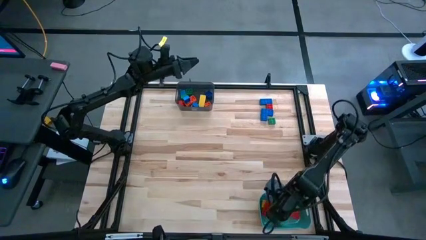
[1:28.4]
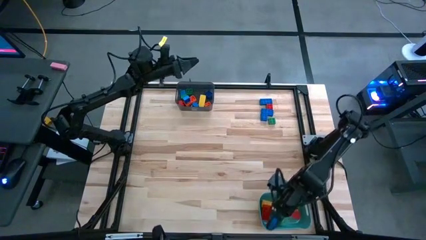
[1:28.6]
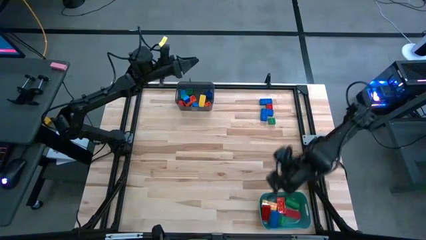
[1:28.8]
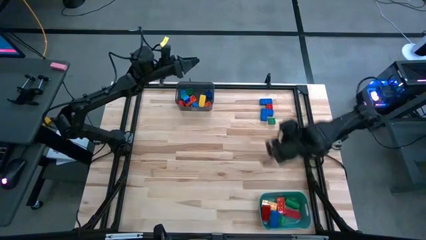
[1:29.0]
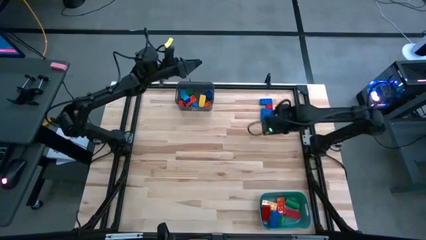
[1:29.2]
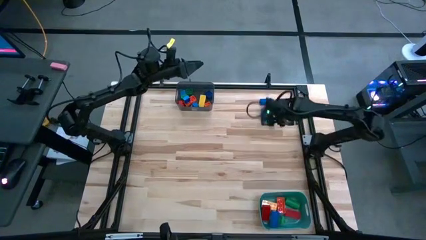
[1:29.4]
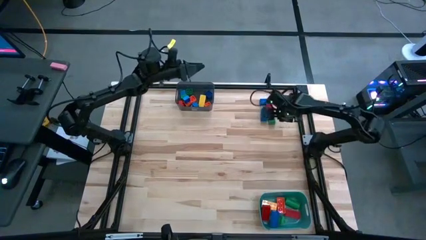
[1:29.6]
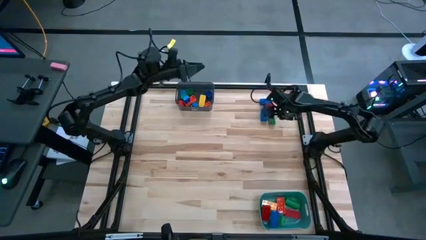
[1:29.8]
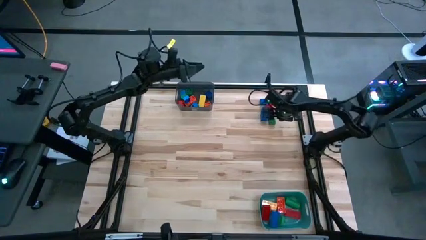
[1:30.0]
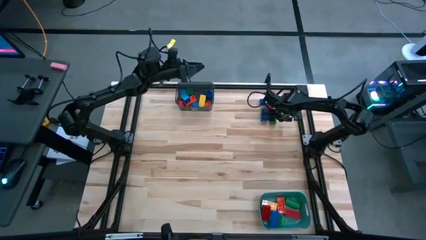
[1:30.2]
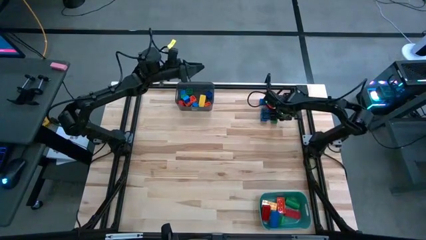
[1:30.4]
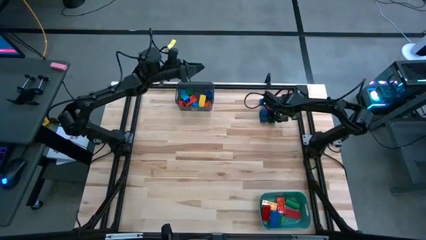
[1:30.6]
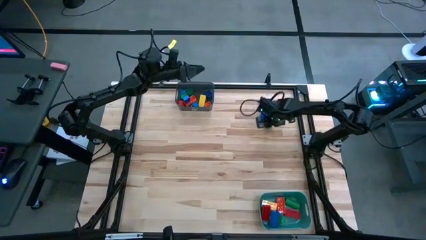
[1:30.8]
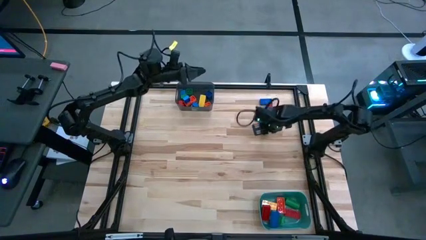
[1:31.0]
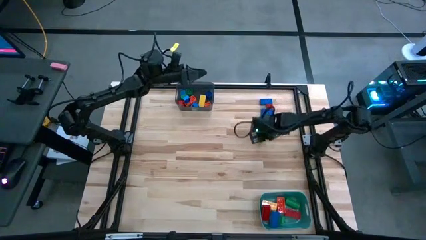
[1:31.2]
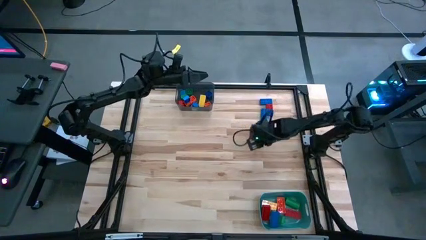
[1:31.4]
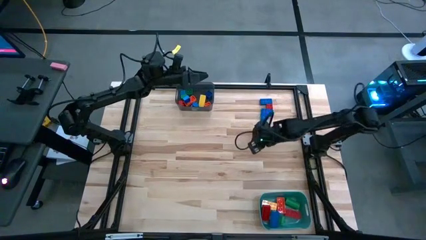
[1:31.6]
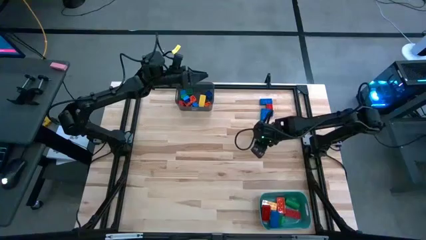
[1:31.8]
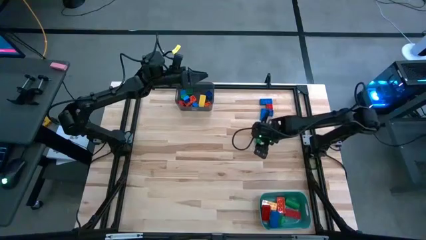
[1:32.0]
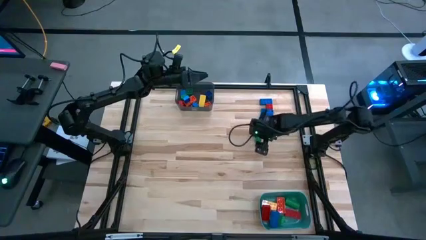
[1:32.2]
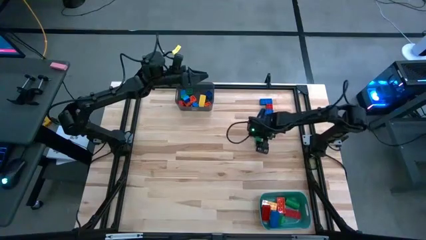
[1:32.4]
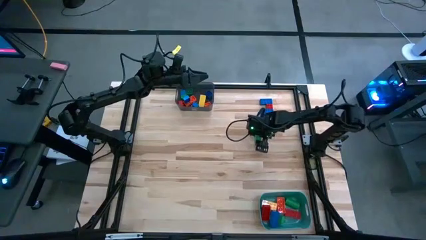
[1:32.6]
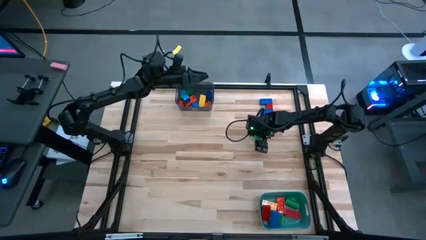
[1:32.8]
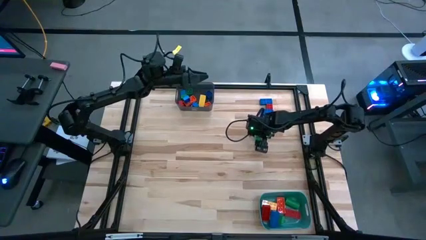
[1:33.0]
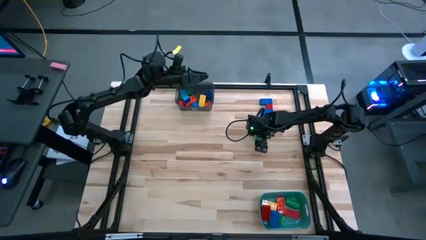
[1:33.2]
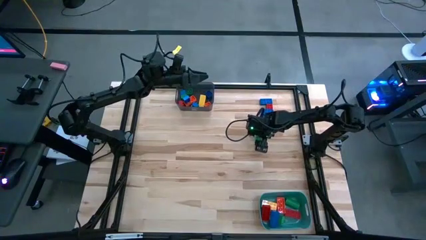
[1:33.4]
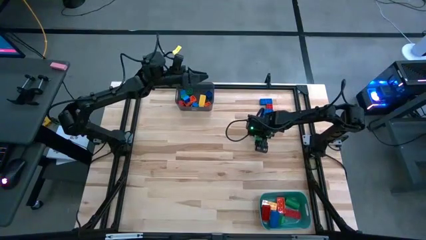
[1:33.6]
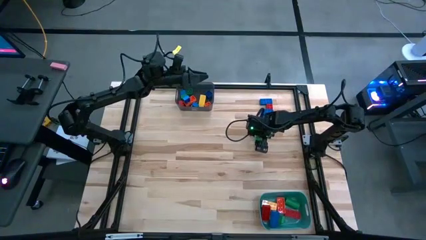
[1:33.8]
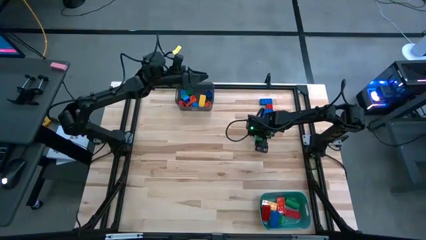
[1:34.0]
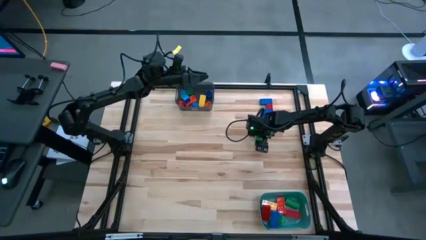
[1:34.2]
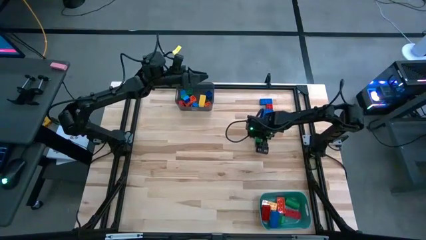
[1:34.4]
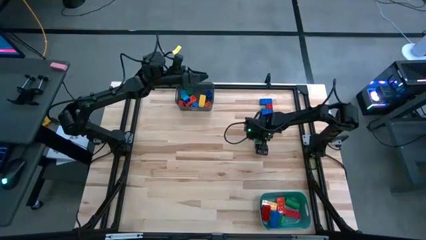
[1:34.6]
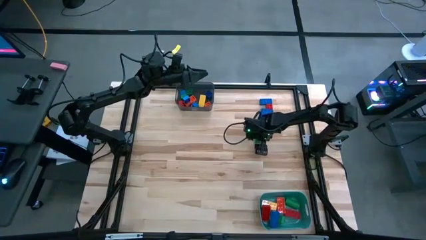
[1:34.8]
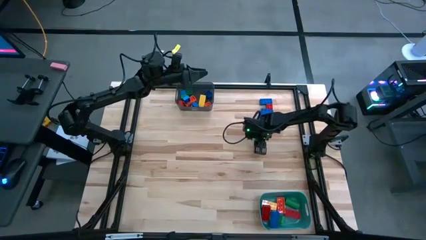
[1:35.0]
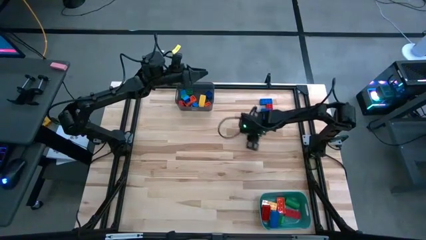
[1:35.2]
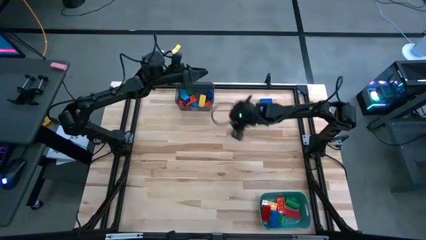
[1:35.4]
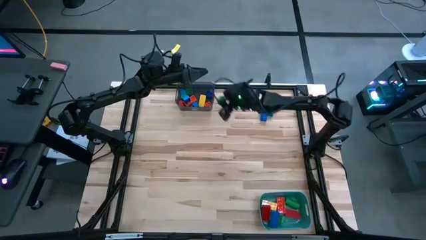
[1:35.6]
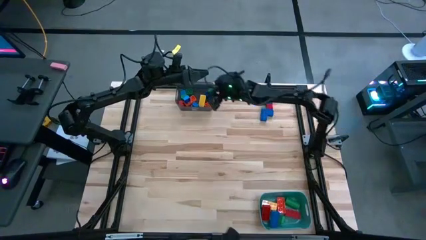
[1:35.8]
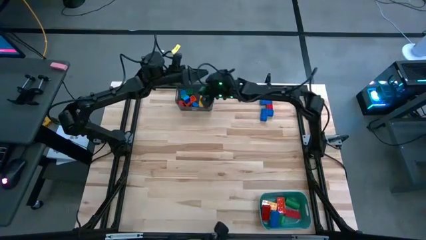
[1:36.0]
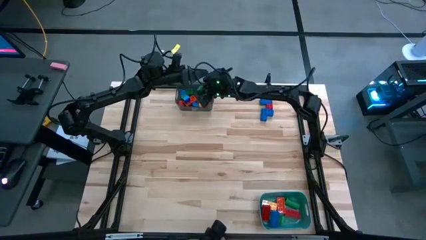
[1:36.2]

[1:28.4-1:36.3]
Task: Sort blocks by size
Put the green game piece into the black bin

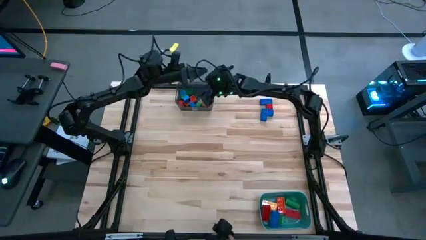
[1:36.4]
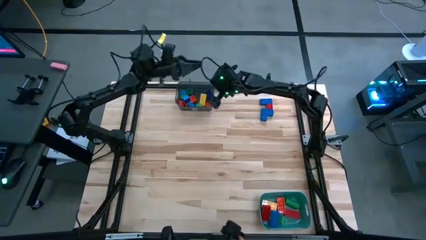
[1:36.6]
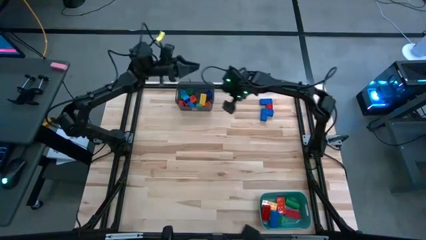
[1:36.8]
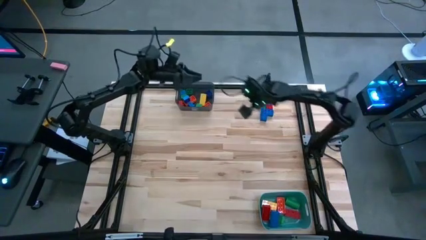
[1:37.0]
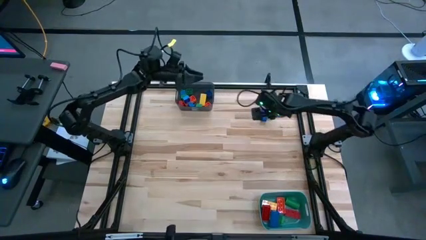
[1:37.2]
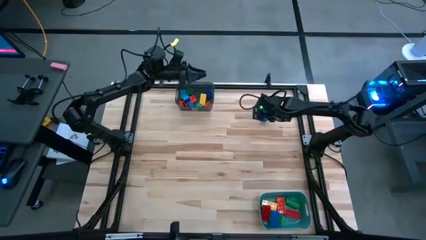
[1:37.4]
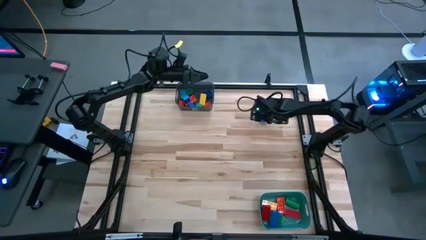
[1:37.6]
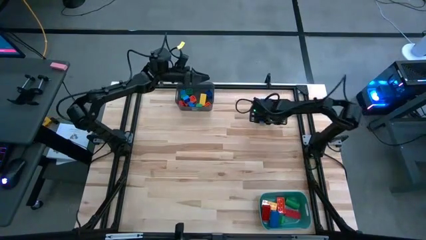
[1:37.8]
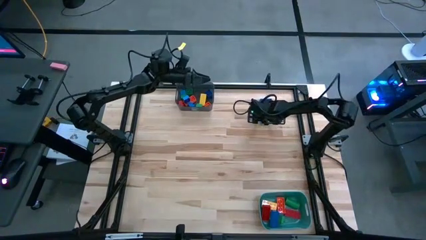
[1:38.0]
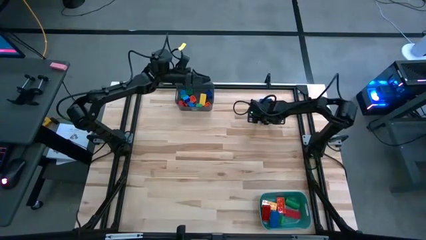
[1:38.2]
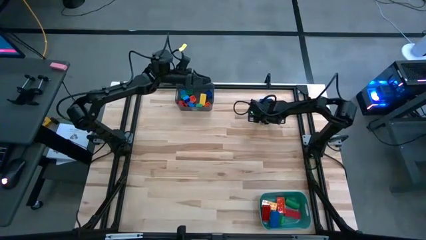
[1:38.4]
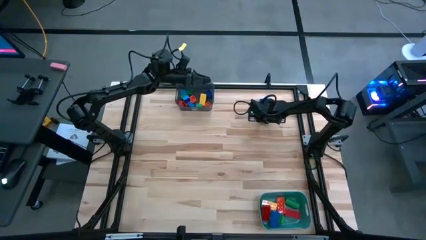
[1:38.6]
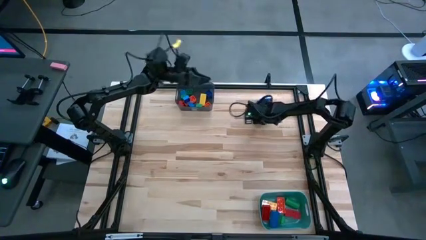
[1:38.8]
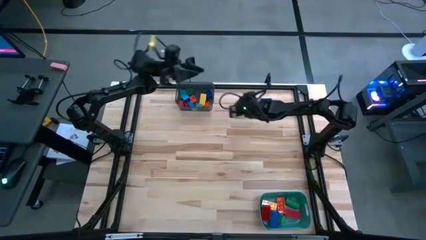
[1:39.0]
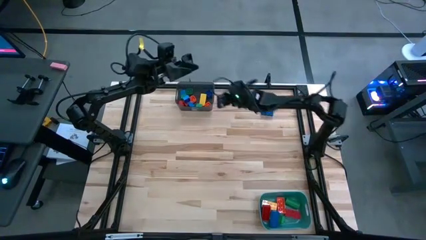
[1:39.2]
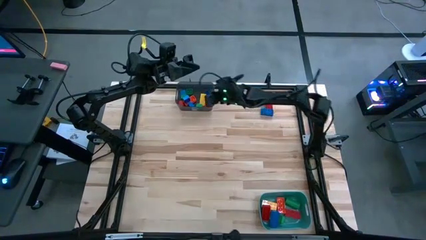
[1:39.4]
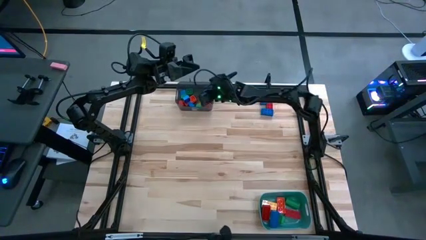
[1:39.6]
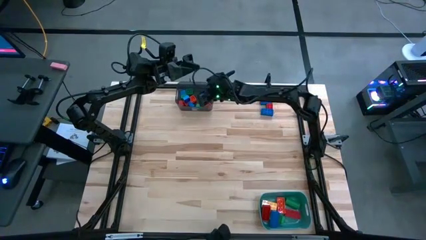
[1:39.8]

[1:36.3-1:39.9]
Put the blue game piece into the black bin

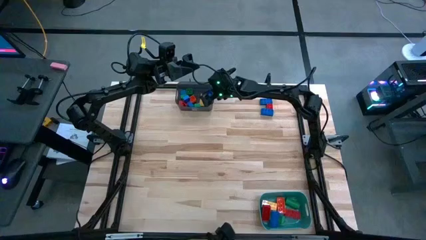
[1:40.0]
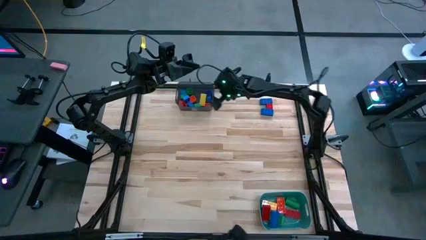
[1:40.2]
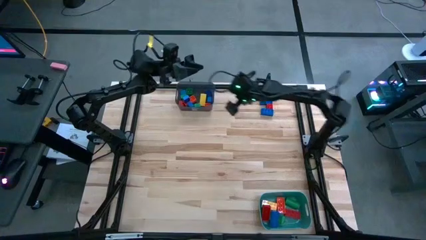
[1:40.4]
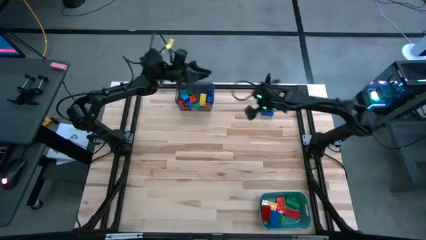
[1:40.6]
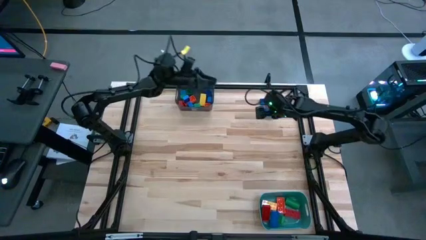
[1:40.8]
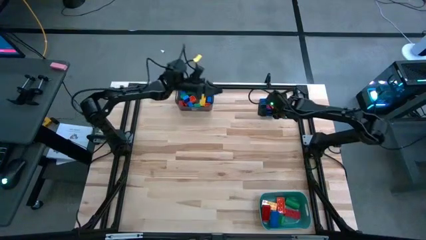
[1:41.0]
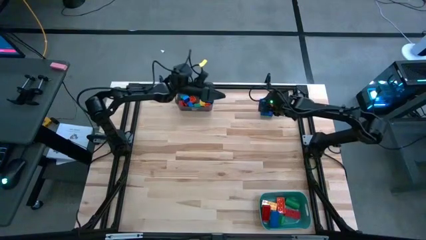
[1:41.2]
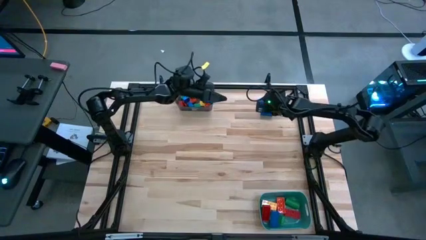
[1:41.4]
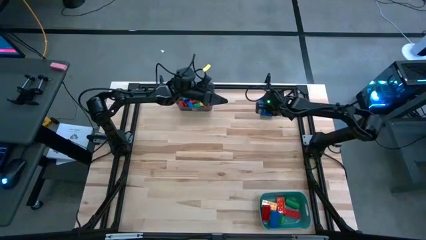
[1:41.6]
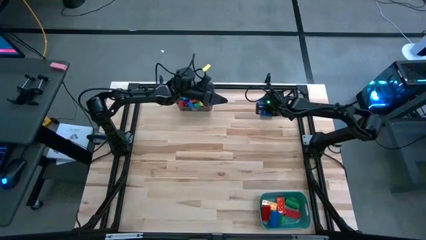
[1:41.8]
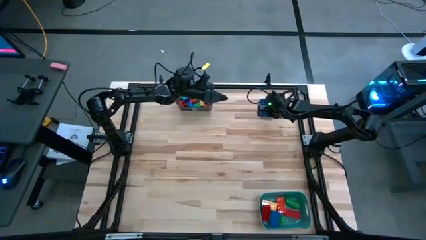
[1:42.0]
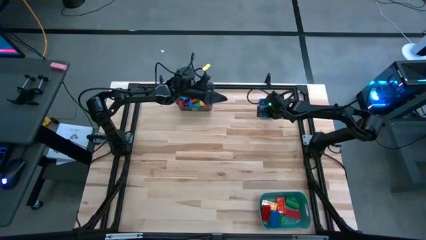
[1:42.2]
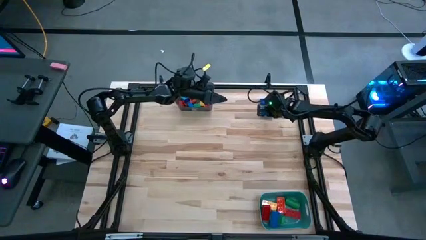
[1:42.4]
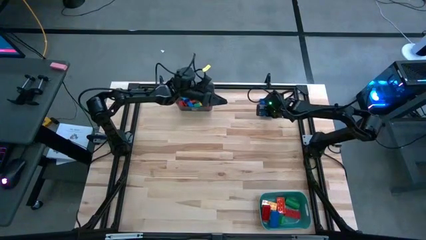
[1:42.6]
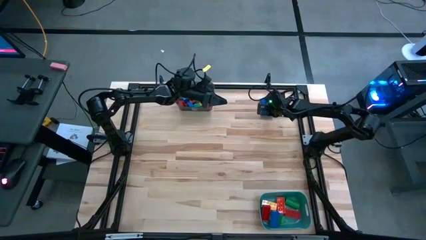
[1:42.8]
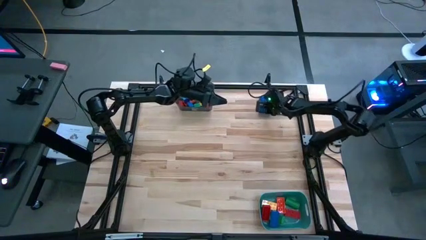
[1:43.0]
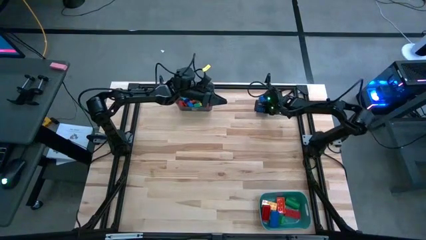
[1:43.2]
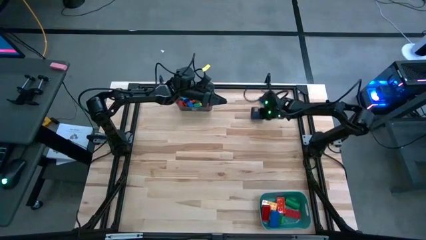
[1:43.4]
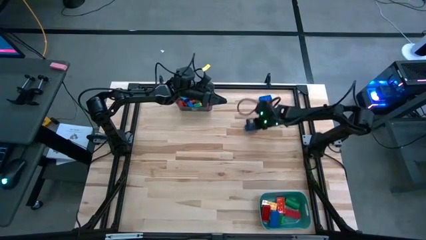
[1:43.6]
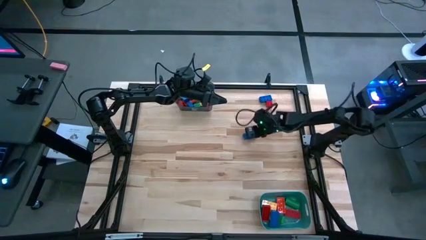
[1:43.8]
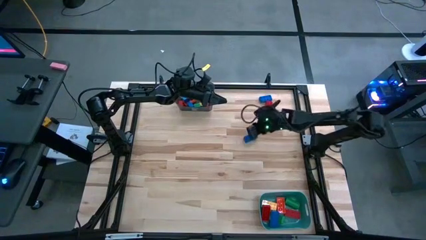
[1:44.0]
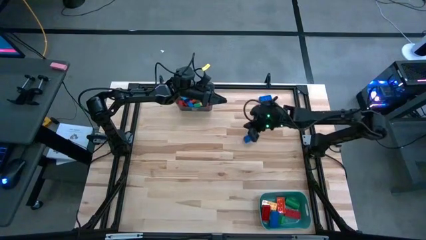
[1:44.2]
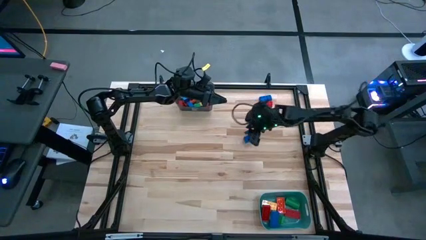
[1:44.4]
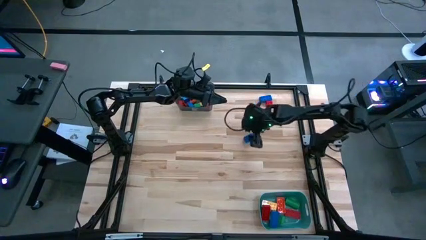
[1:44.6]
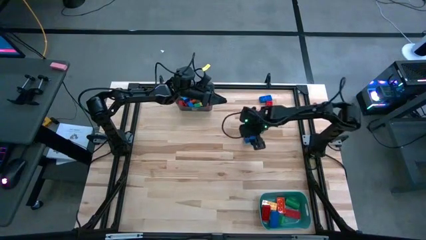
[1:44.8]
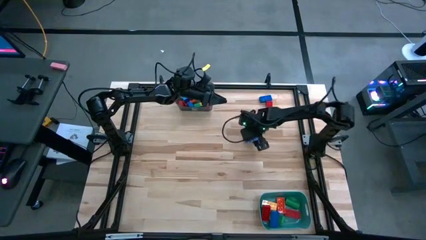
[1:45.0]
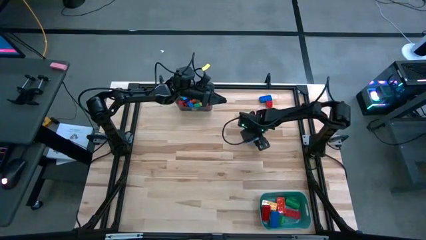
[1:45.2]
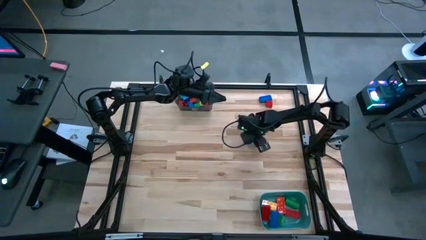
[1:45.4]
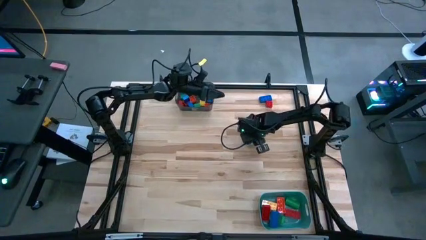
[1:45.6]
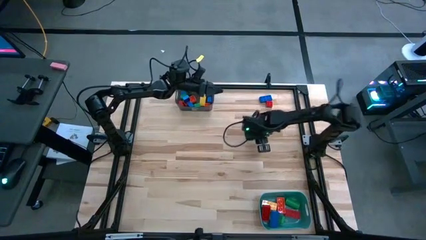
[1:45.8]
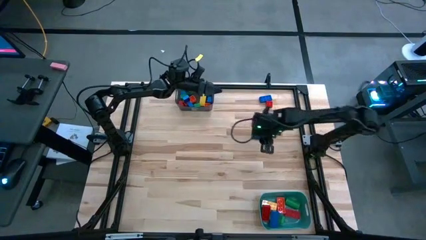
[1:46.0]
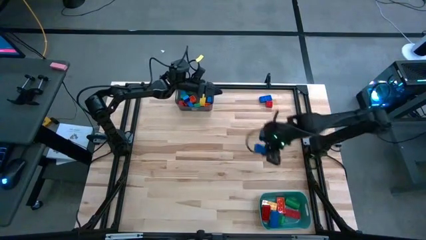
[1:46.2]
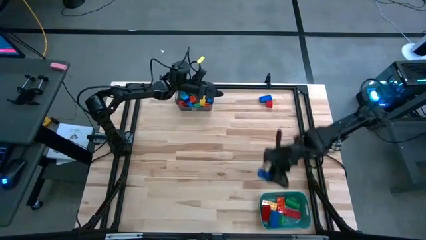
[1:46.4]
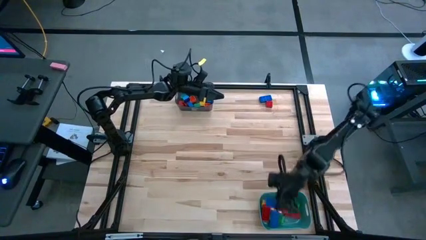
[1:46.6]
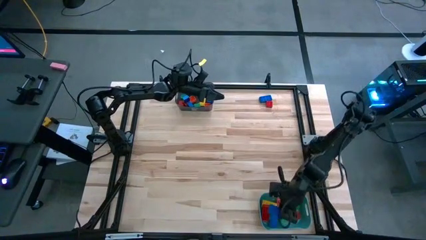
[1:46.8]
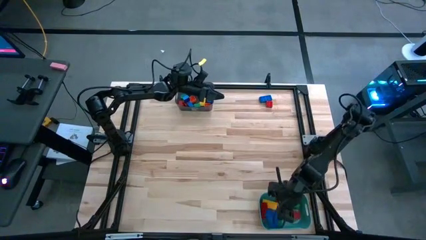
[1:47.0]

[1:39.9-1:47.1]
Put the blue game piece into the green bin
